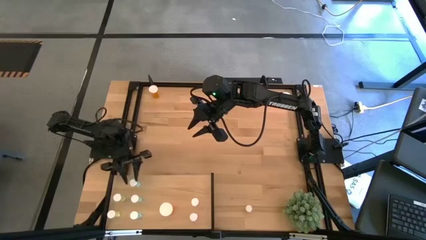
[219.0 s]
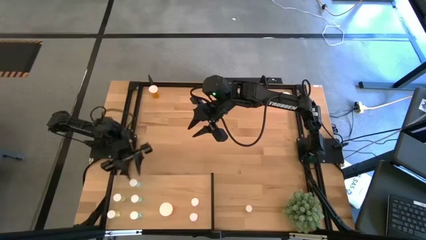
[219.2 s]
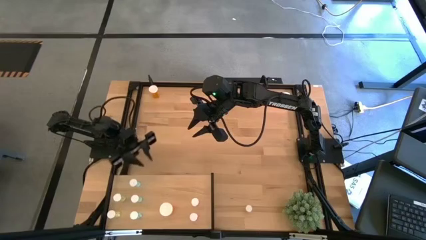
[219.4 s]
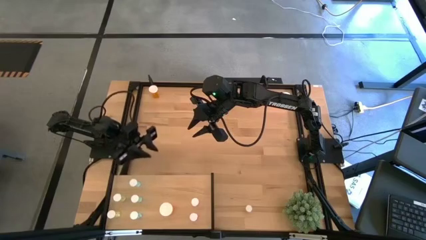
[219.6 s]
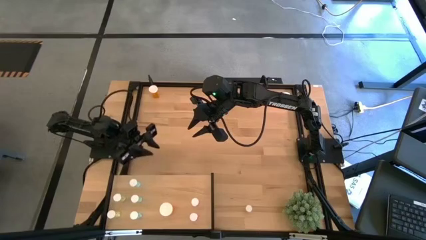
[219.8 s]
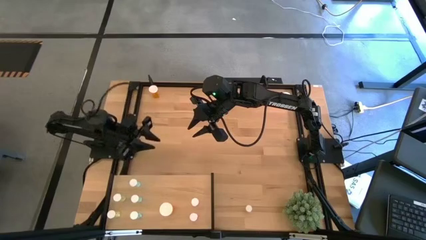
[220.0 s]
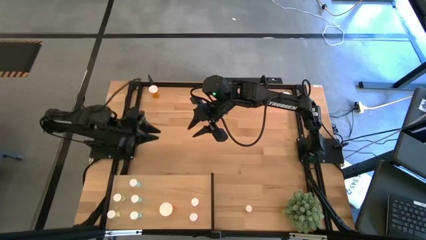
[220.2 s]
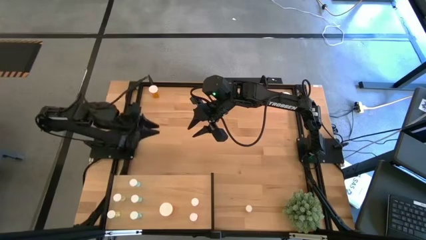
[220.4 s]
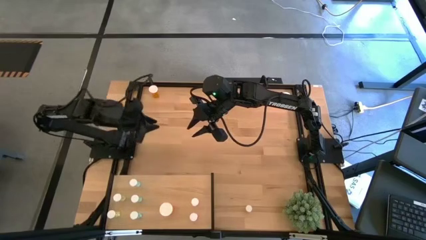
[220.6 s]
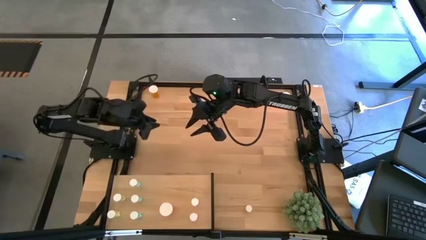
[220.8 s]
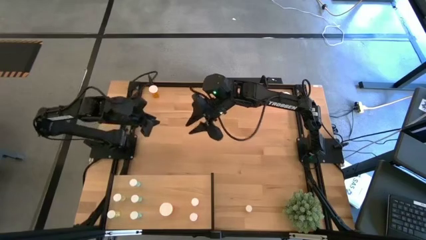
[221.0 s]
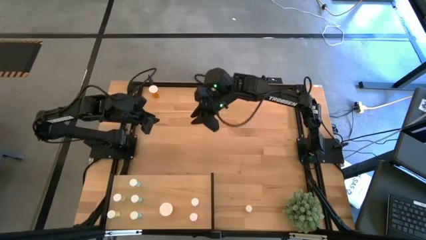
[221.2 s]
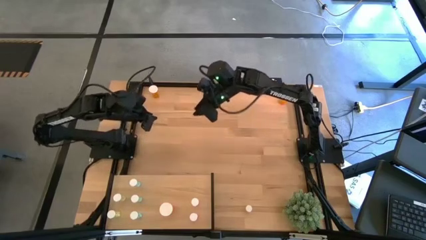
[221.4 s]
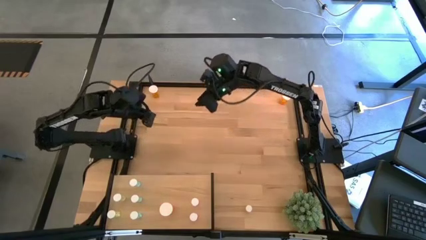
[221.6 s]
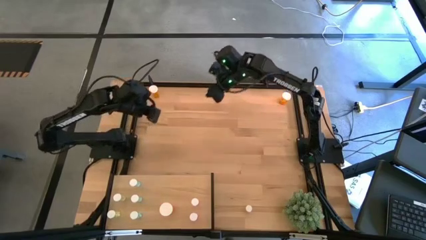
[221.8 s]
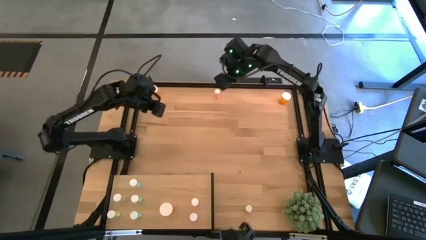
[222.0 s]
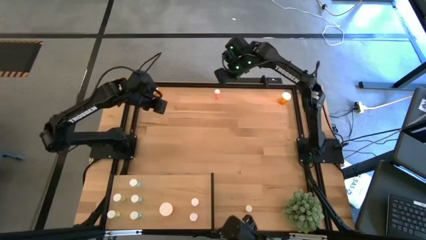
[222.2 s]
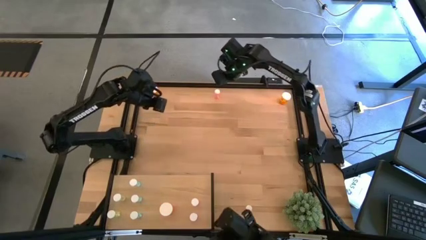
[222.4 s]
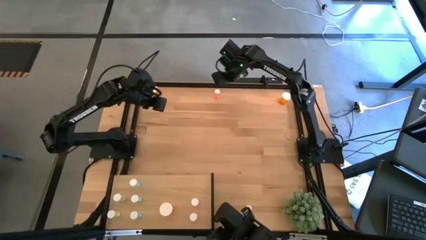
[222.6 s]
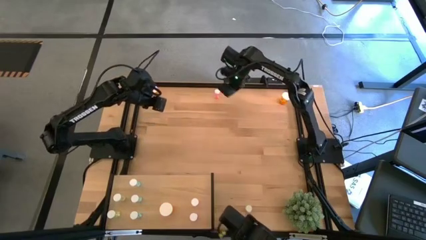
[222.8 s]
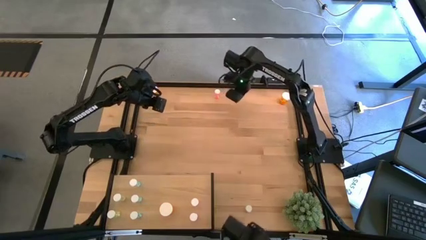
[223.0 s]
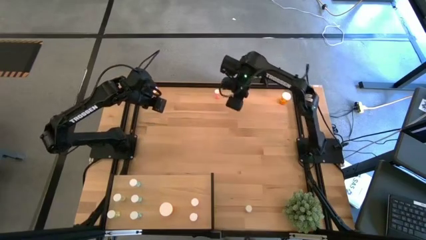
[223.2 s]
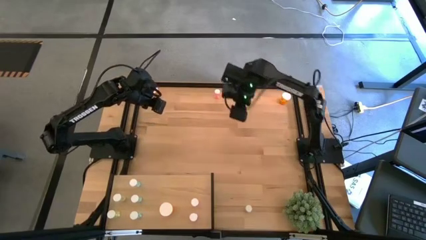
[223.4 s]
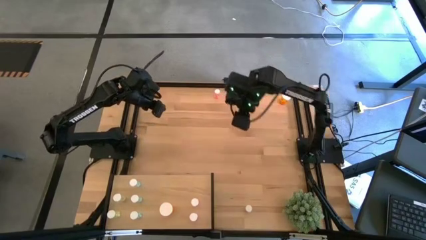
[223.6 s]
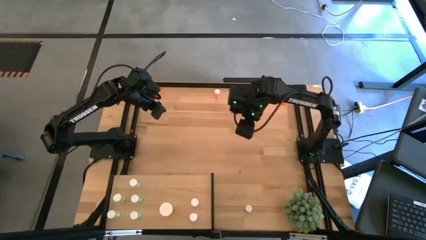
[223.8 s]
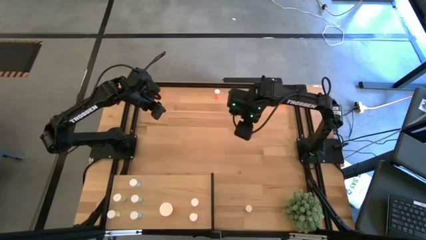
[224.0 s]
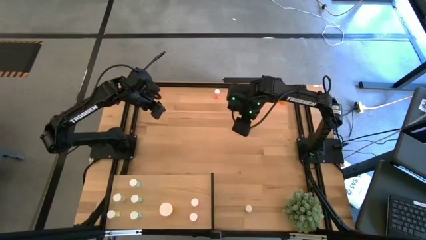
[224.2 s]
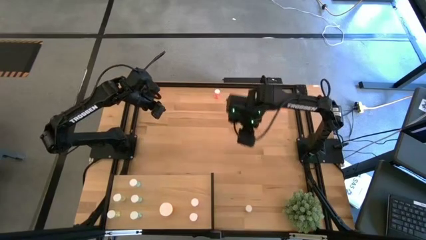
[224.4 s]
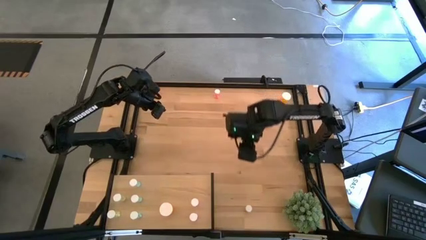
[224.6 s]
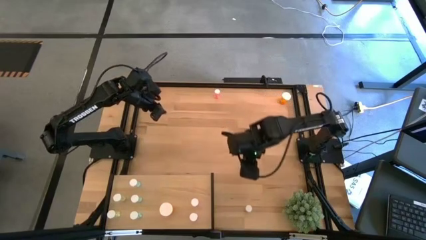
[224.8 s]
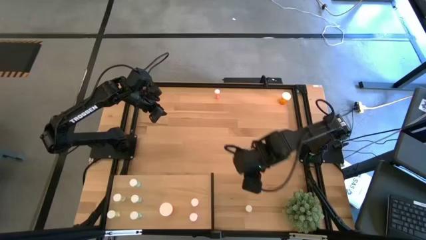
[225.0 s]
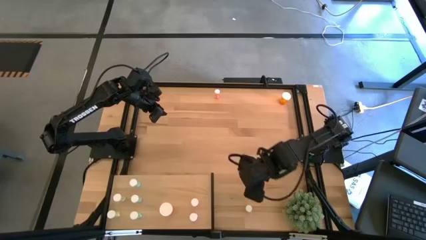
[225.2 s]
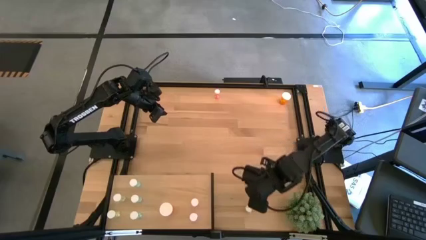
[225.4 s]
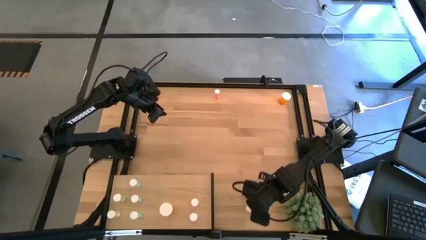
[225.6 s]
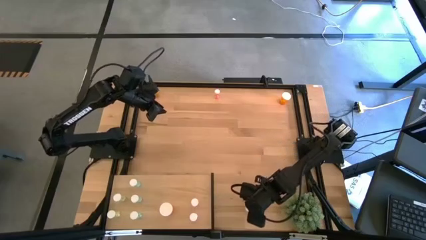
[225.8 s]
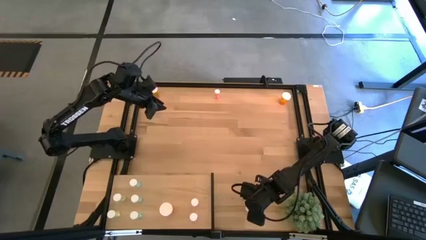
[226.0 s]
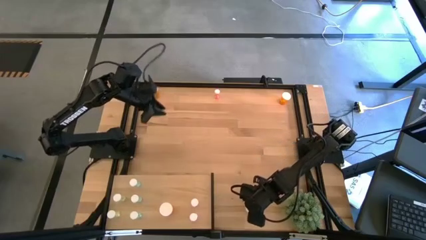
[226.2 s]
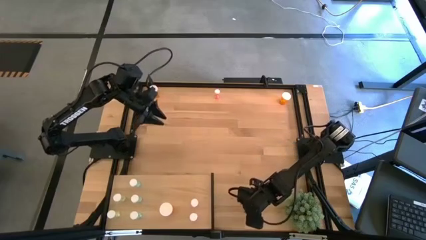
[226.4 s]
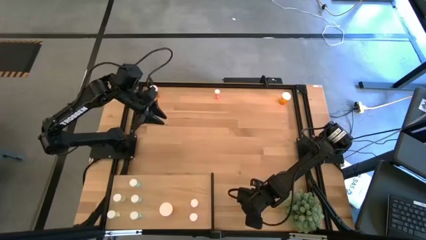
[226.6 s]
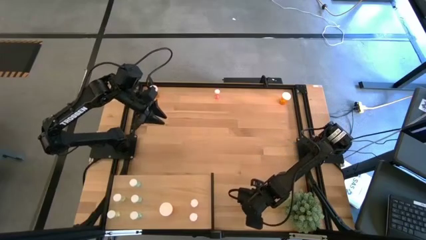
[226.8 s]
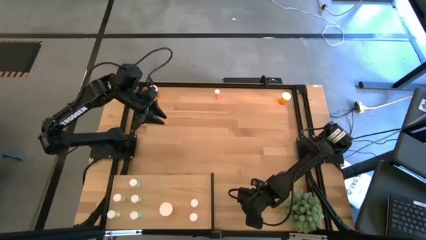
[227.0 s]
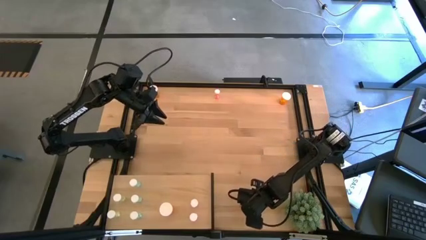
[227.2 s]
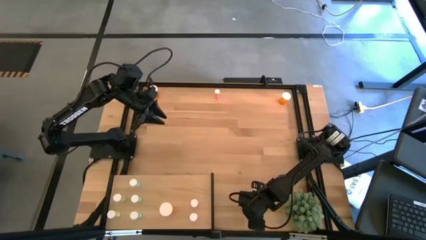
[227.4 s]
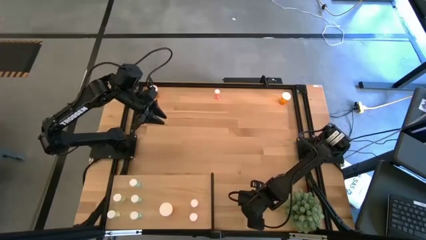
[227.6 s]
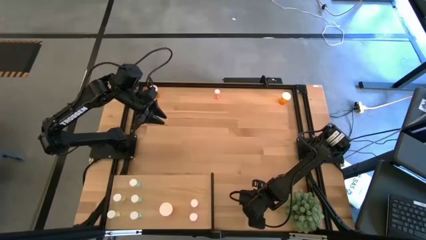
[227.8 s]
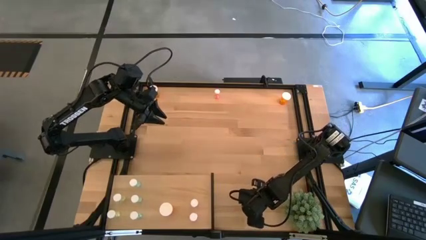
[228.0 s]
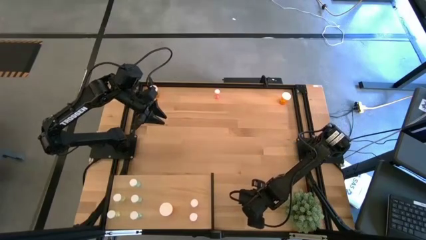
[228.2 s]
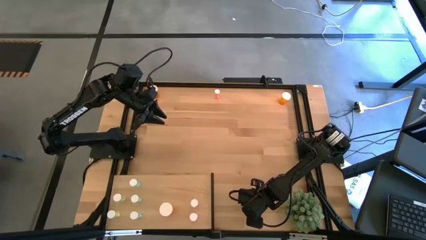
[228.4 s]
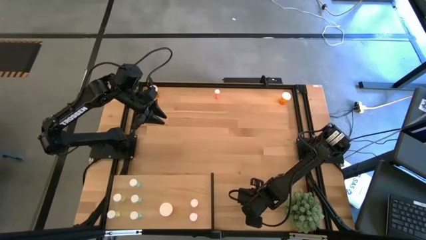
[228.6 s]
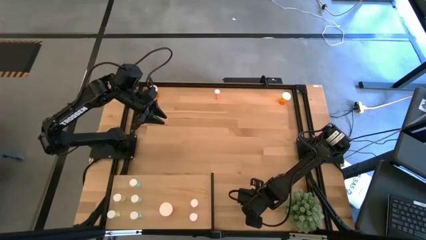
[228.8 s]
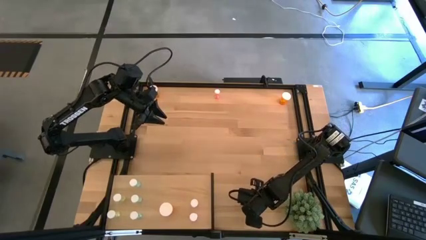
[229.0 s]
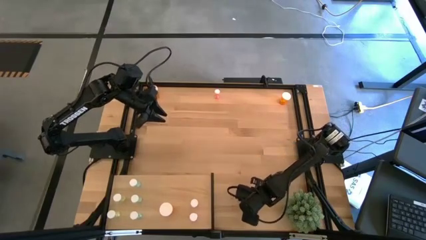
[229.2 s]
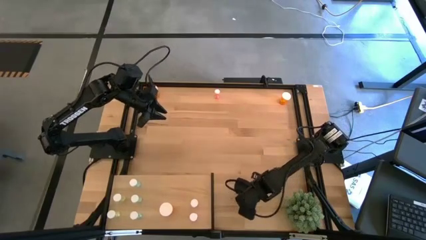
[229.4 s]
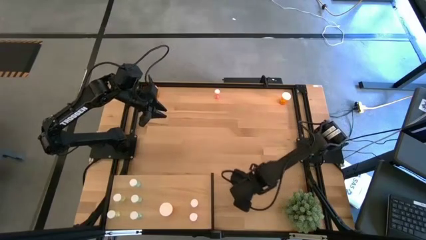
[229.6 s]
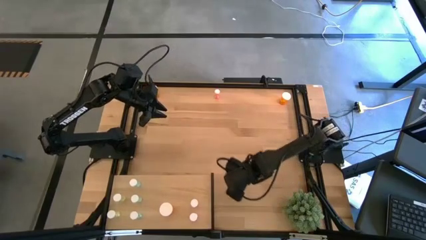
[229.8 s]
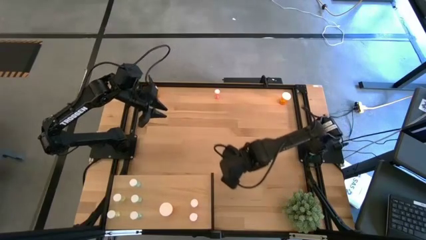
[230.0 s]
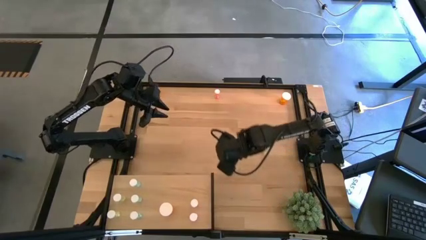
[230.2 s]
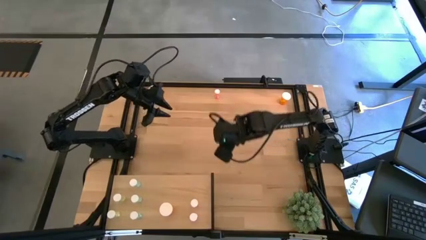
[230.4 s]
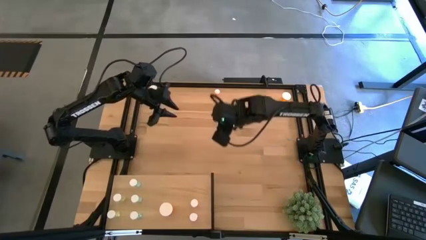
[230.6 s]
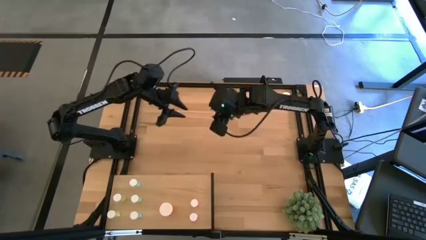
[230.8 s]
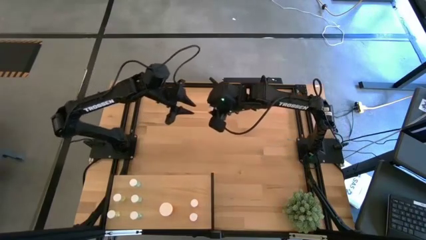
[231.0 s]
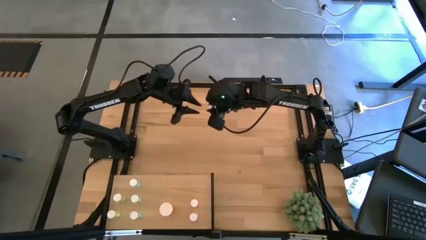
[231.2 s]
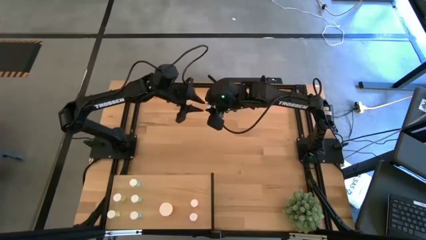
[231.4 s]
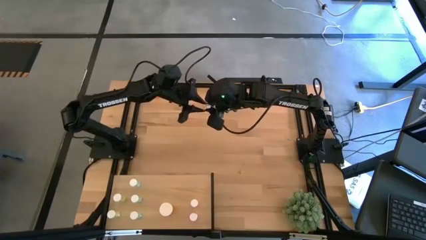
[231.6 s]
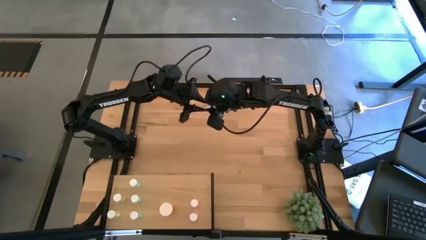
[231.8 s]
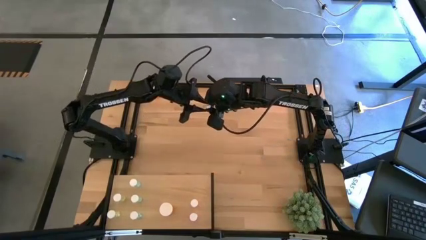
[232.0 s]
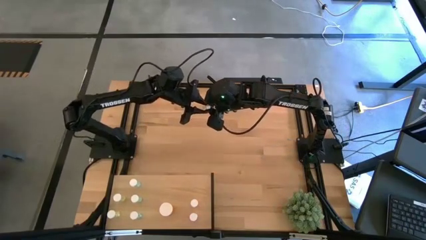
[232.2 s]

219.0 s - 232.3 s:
Task: Pick and place medicine bottles onto shelf by color
Put the yellow pill bottle on the shelf aligned with the other yellow pill bottle

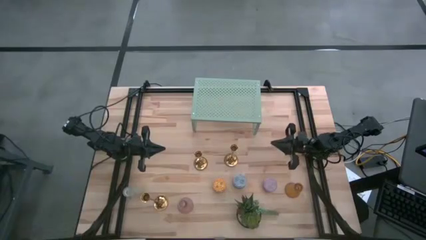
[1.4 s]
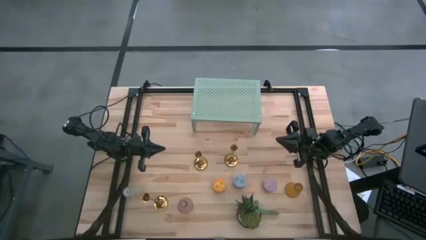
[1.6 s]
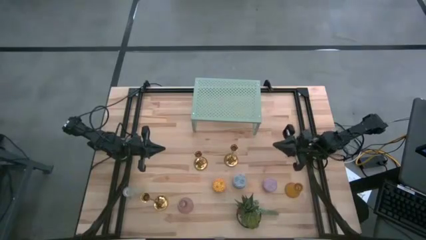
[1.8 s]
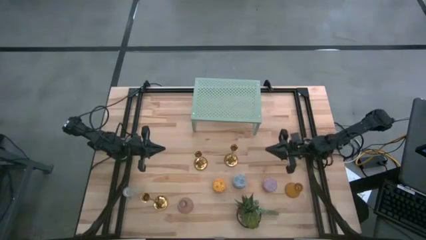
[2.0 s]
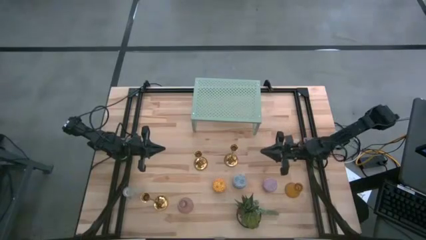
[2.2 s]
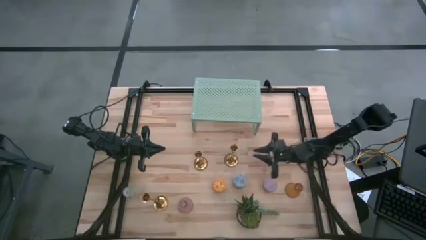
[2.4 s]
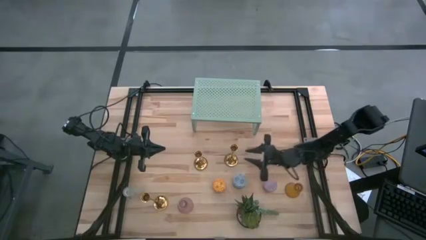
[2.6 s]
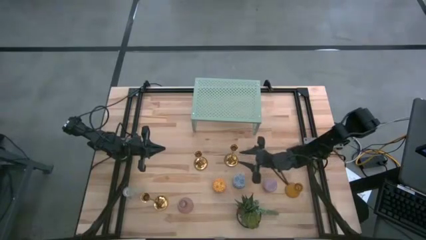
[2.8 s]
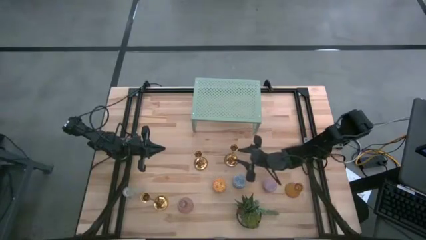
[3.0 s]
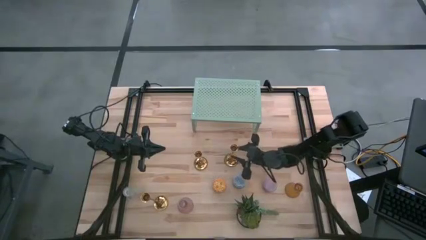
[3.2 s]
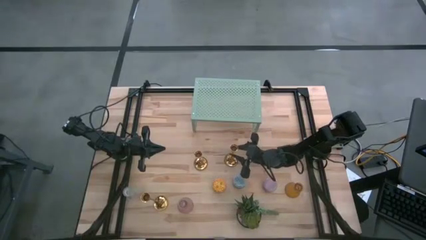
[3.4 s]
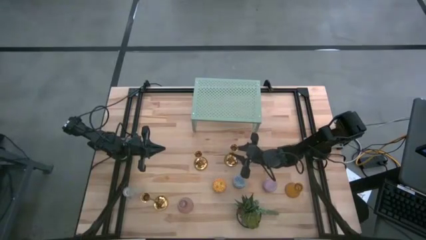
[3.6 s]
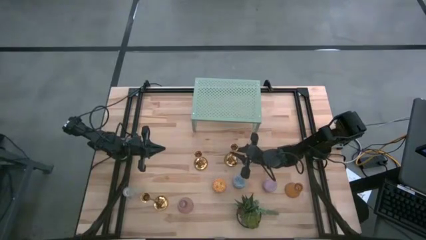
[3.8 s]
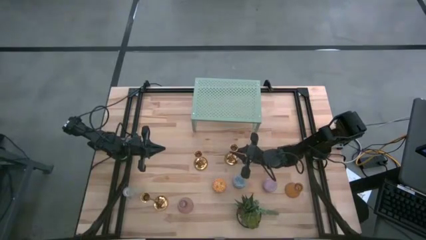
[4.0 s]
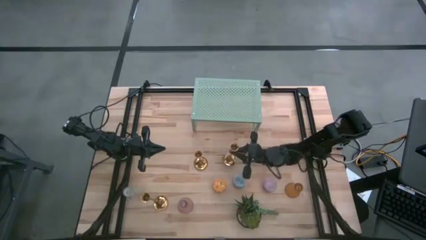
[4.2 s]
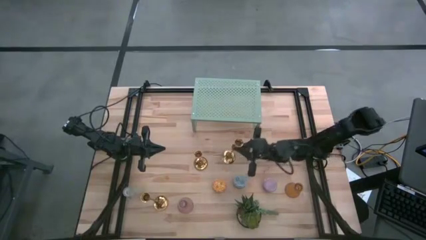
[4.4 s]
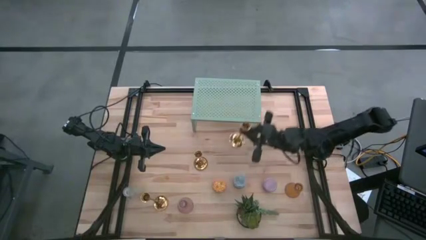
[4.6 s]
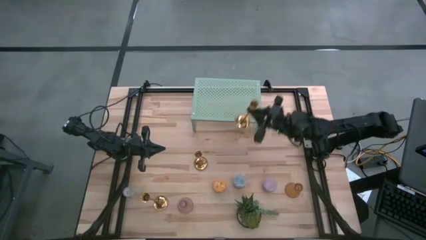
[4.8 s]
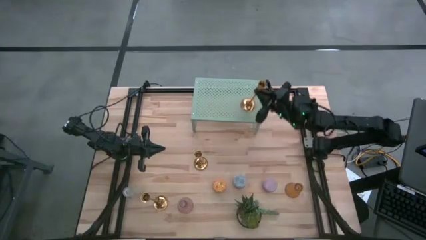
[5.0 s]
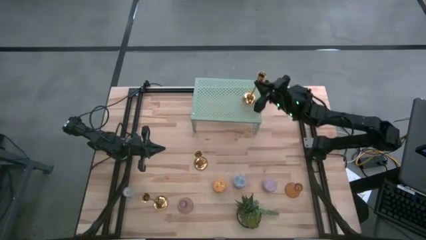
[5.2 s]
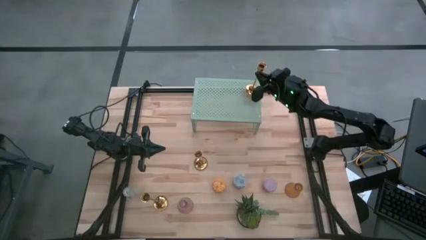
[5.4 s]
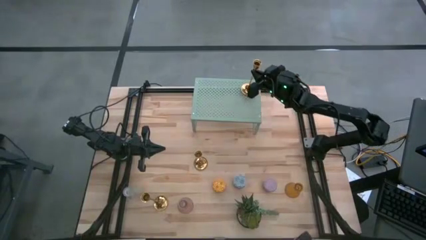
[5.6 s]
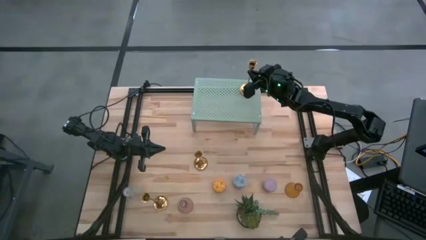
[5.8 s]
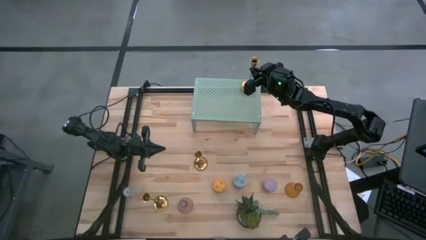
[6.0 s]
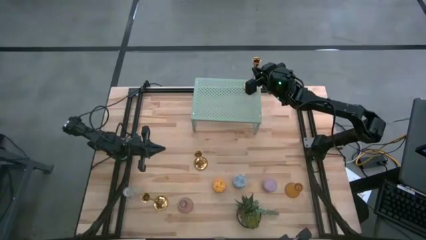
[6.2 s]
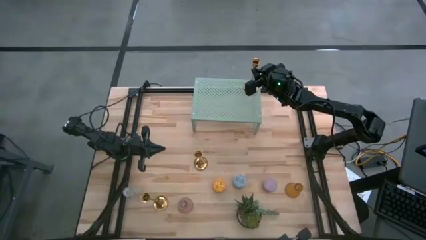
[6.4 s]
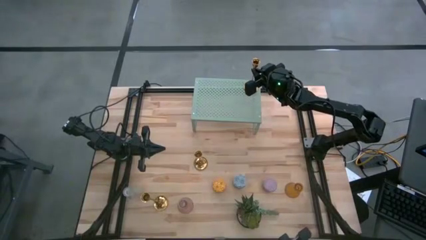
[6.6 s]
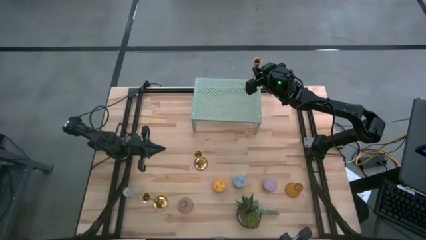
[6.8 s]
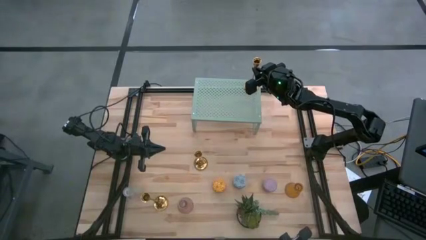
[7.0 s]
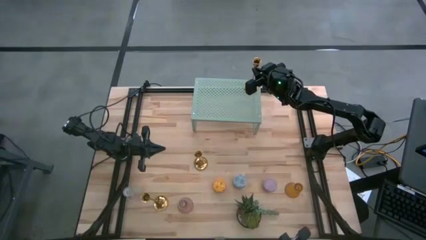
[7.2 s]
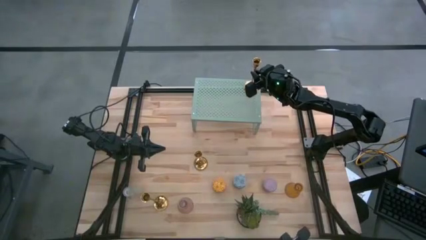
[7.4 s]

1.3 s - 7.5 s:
Task: Pick & Place candle stick holders
Put the top right gold candle holder on the shelf
